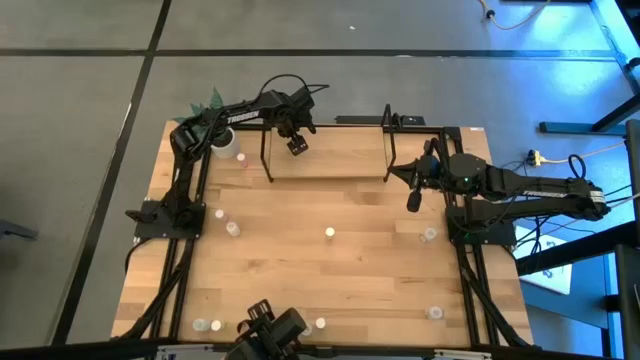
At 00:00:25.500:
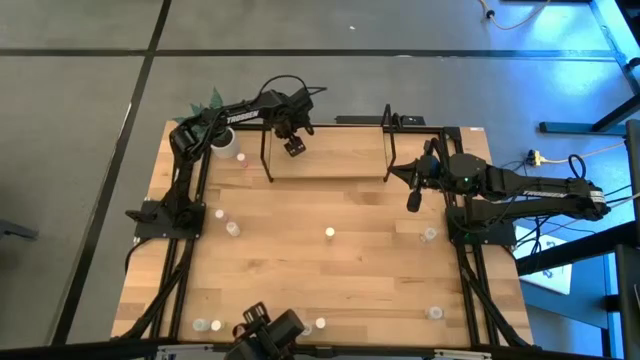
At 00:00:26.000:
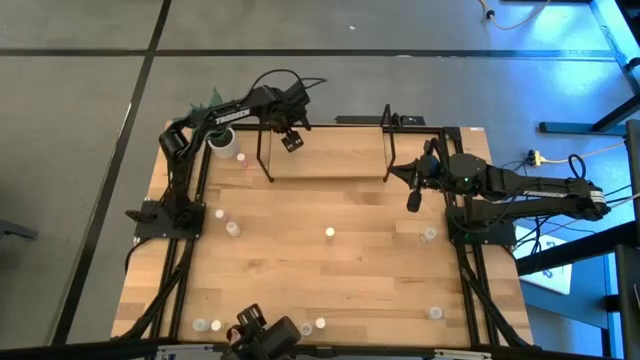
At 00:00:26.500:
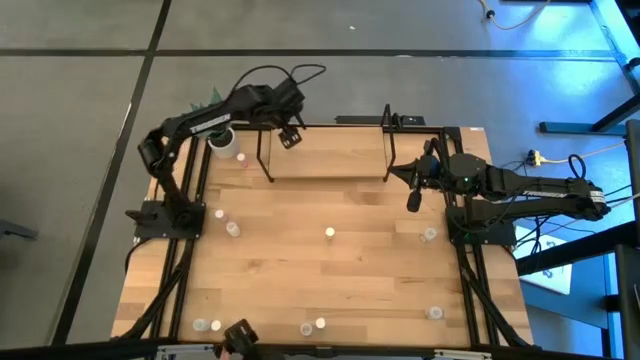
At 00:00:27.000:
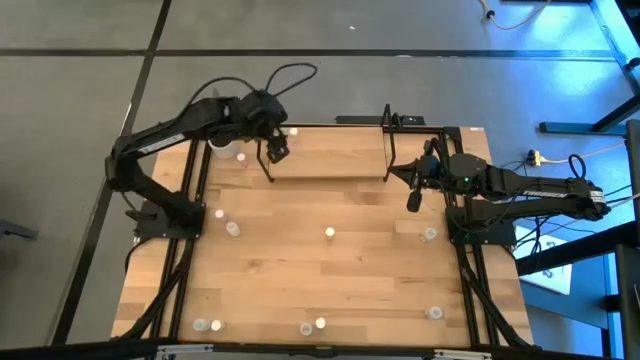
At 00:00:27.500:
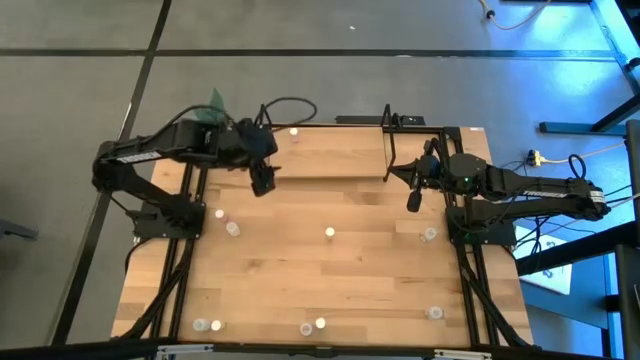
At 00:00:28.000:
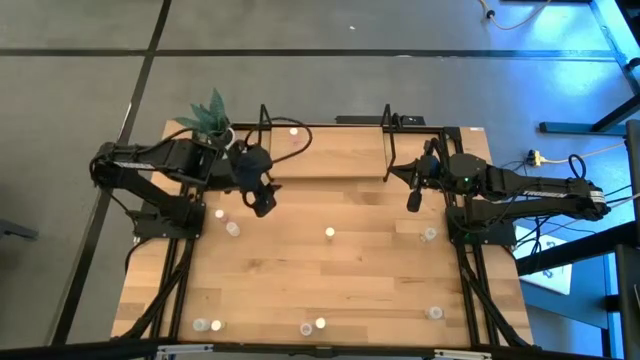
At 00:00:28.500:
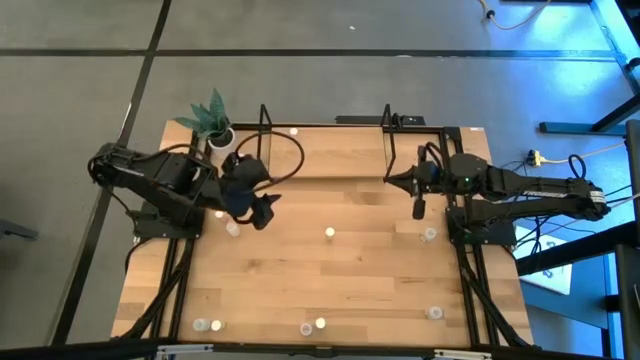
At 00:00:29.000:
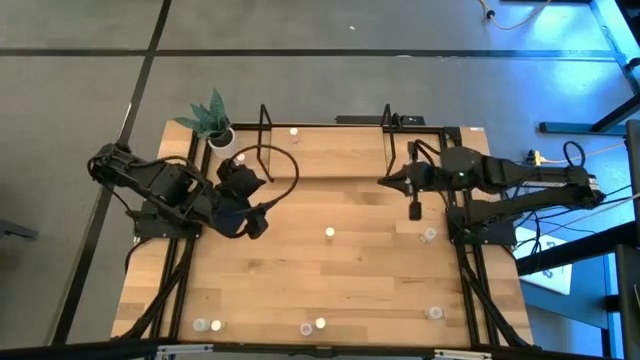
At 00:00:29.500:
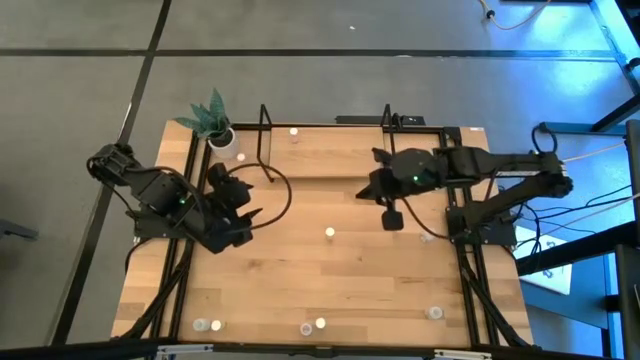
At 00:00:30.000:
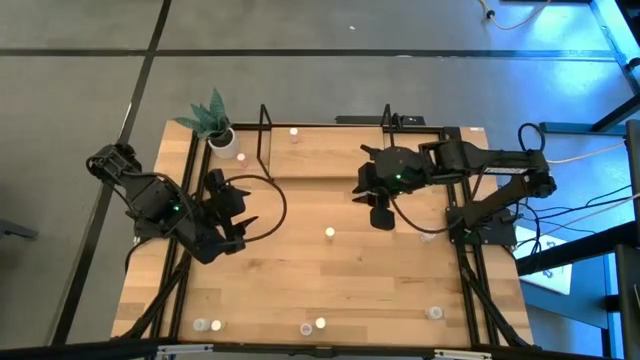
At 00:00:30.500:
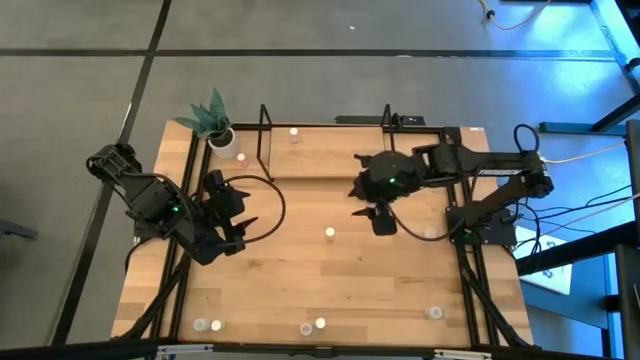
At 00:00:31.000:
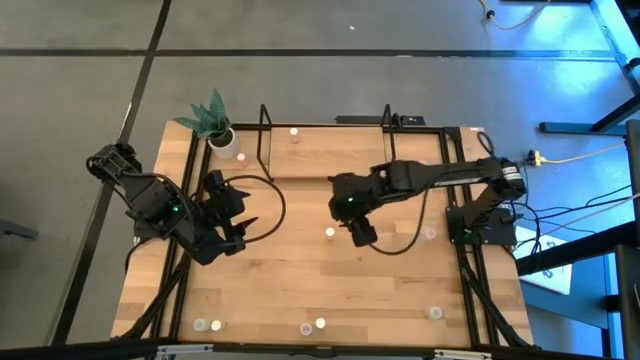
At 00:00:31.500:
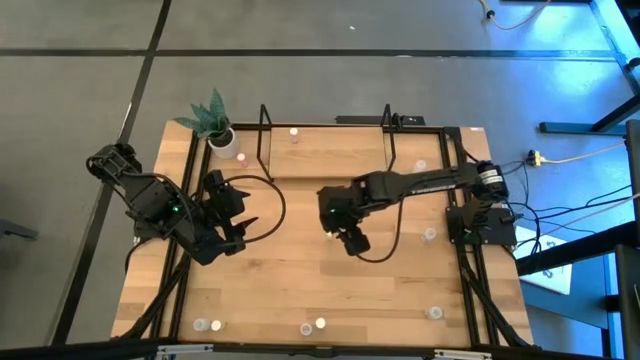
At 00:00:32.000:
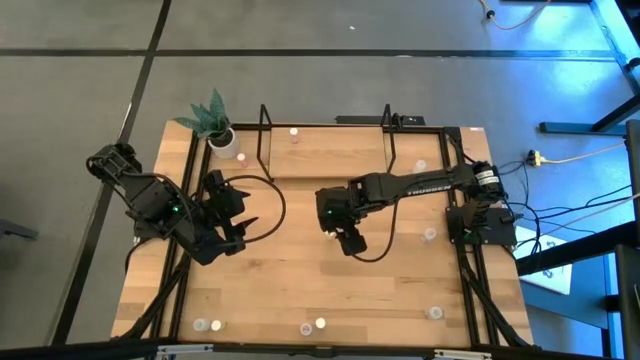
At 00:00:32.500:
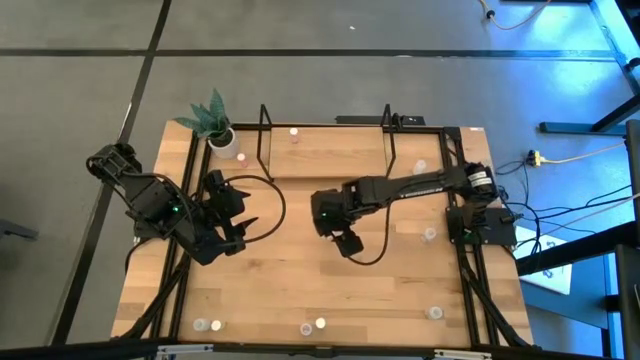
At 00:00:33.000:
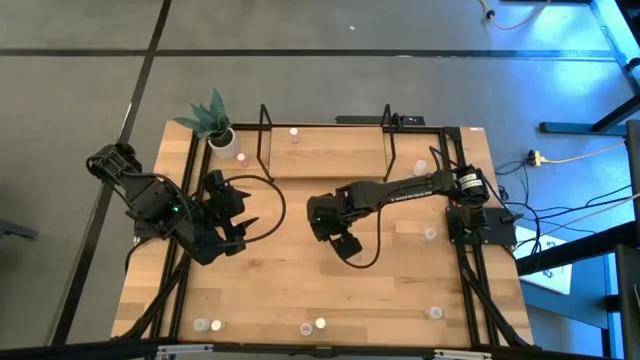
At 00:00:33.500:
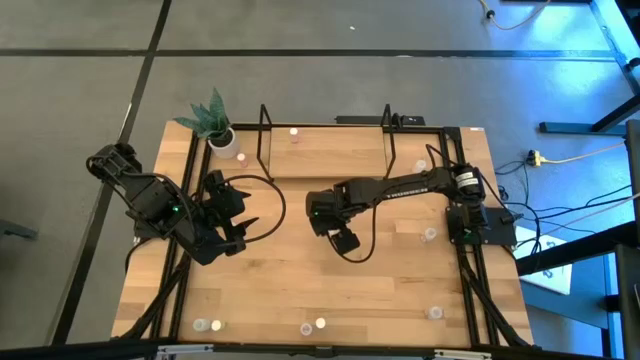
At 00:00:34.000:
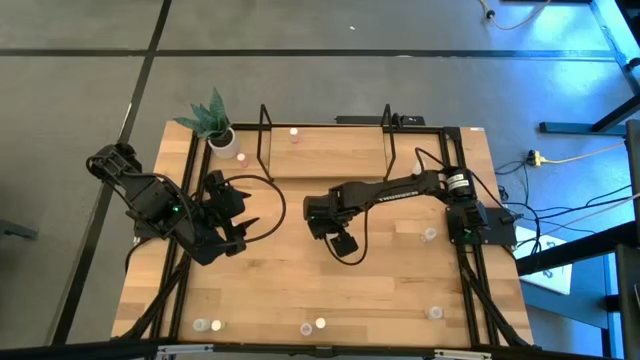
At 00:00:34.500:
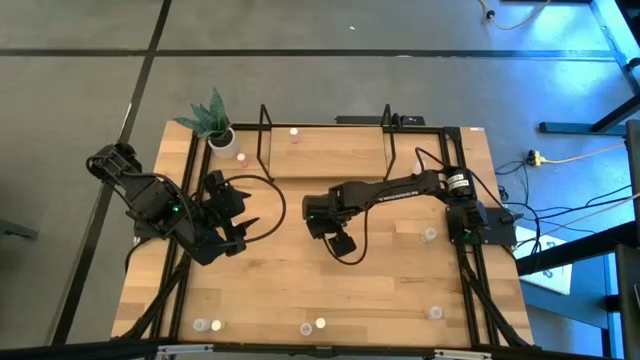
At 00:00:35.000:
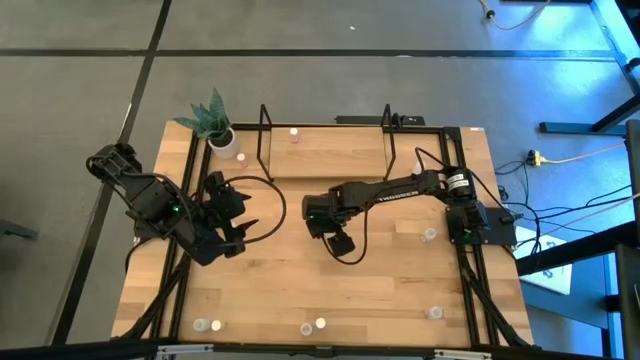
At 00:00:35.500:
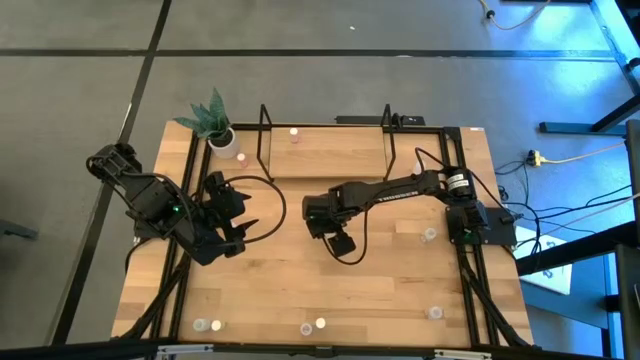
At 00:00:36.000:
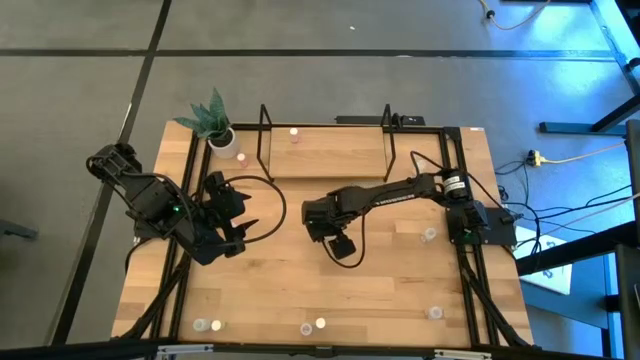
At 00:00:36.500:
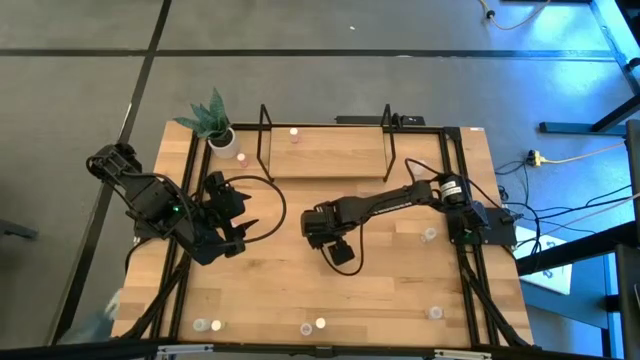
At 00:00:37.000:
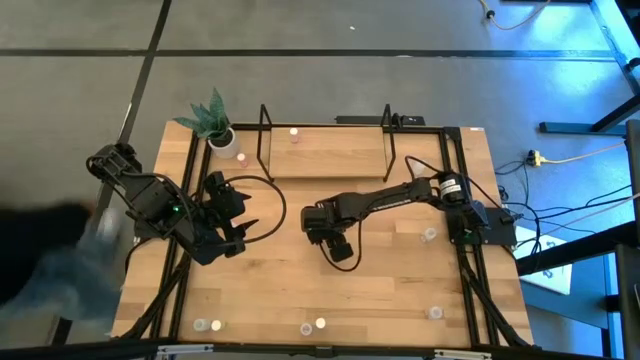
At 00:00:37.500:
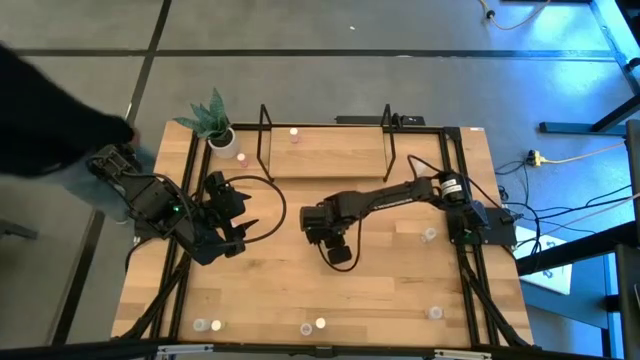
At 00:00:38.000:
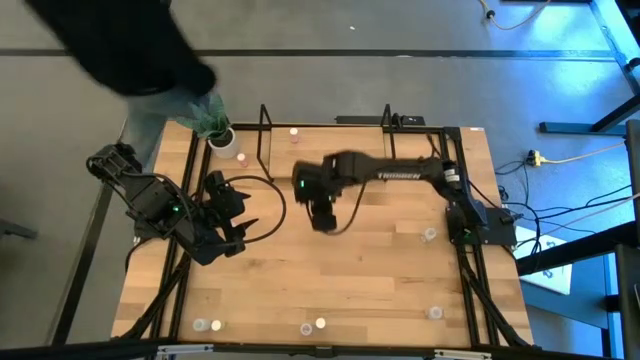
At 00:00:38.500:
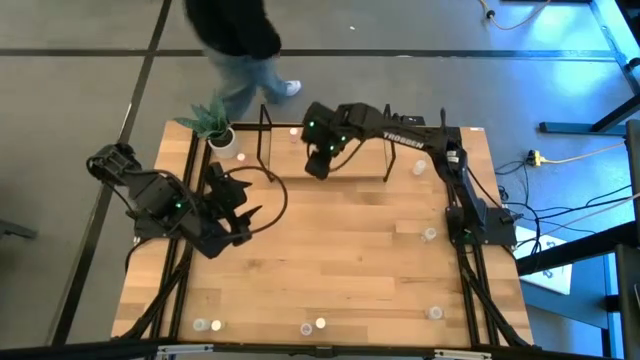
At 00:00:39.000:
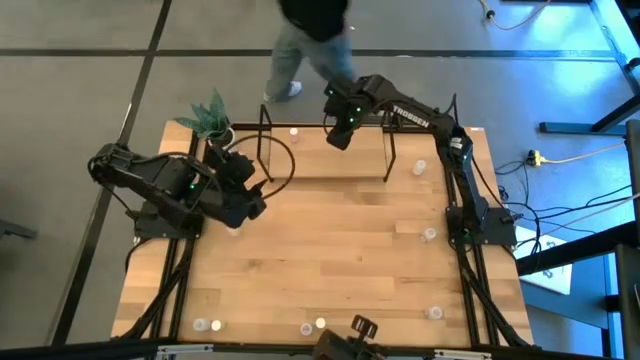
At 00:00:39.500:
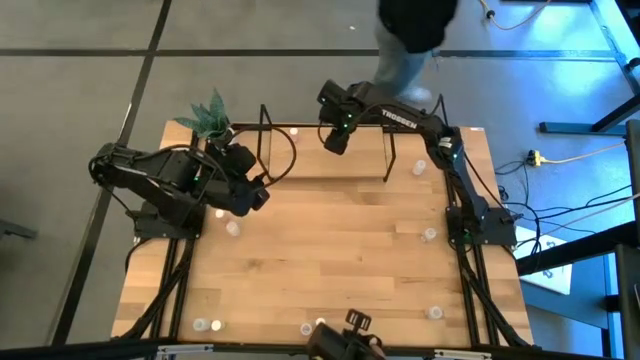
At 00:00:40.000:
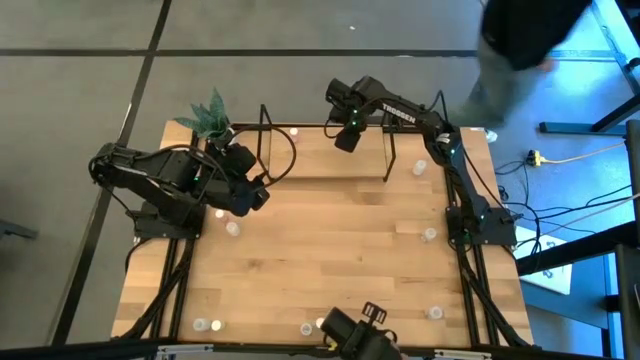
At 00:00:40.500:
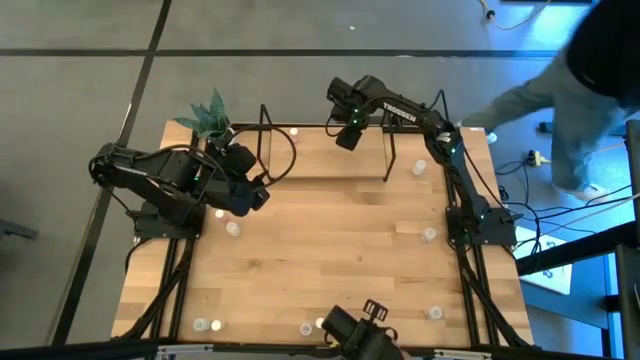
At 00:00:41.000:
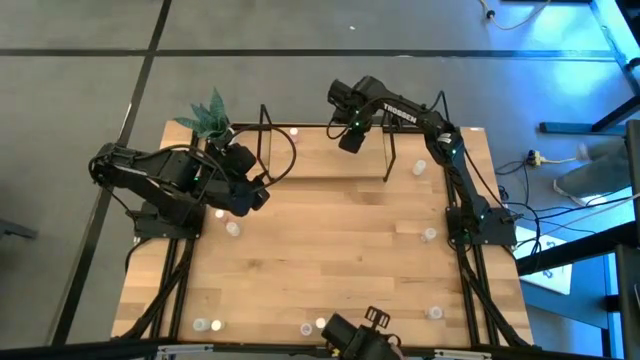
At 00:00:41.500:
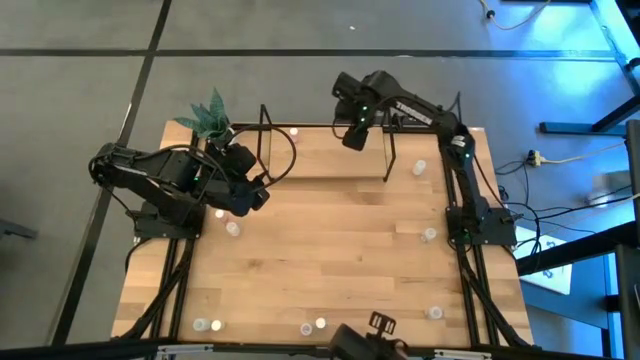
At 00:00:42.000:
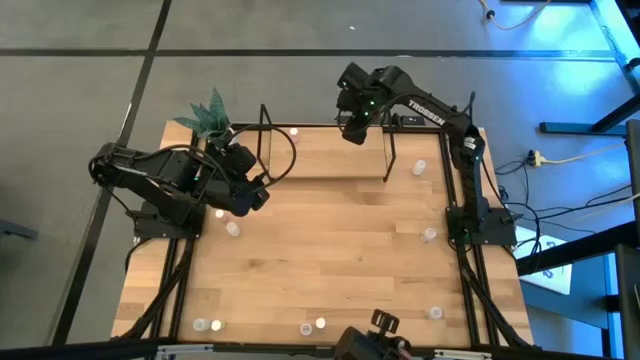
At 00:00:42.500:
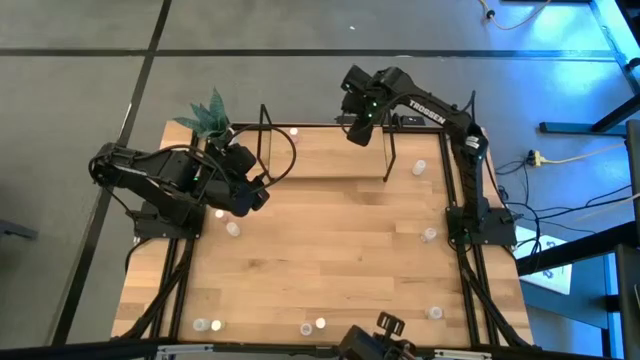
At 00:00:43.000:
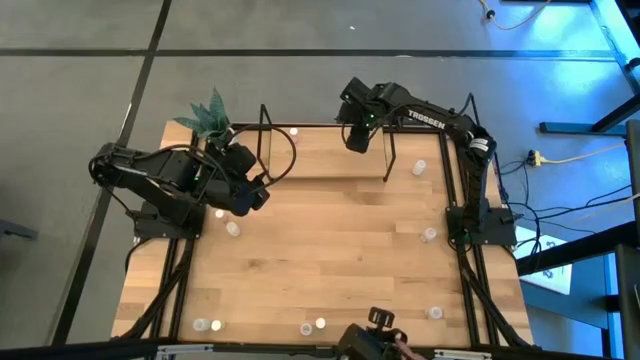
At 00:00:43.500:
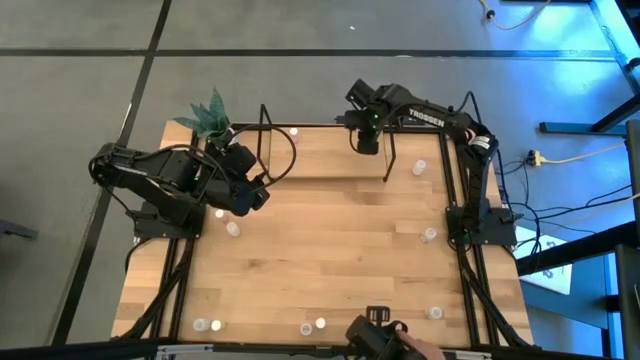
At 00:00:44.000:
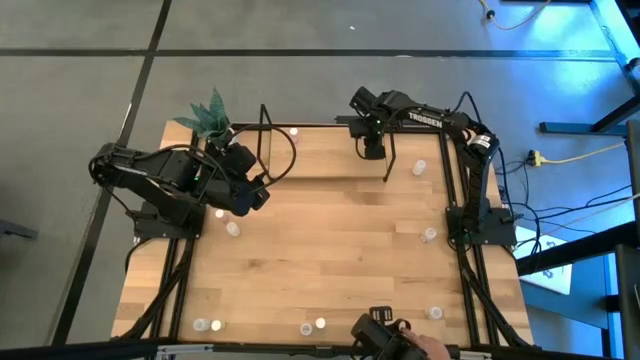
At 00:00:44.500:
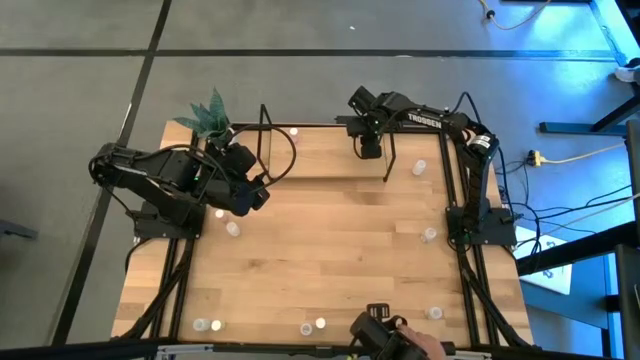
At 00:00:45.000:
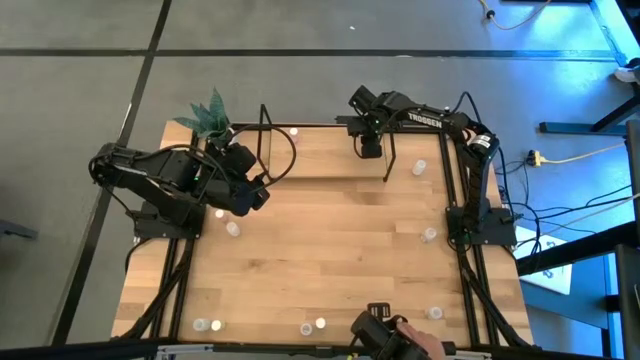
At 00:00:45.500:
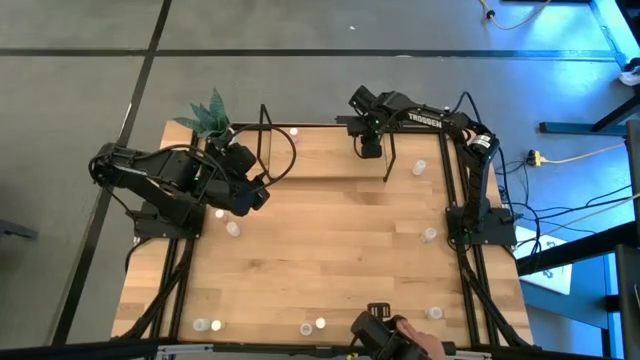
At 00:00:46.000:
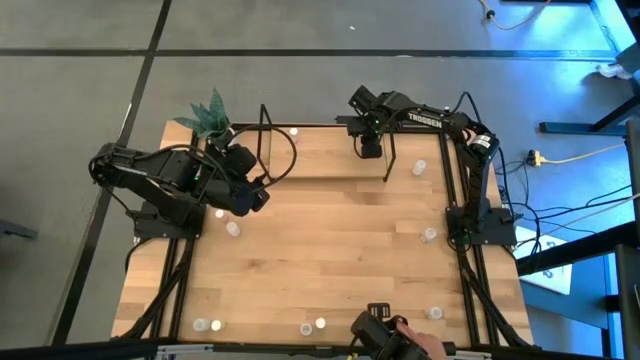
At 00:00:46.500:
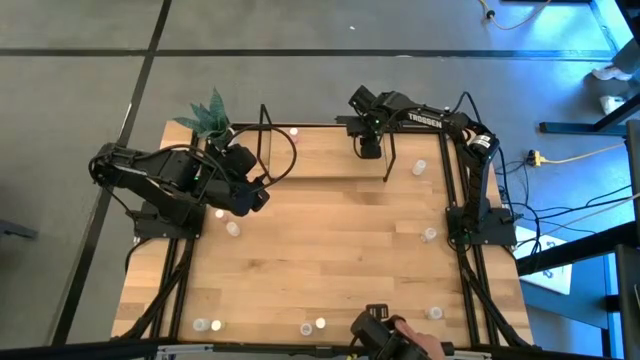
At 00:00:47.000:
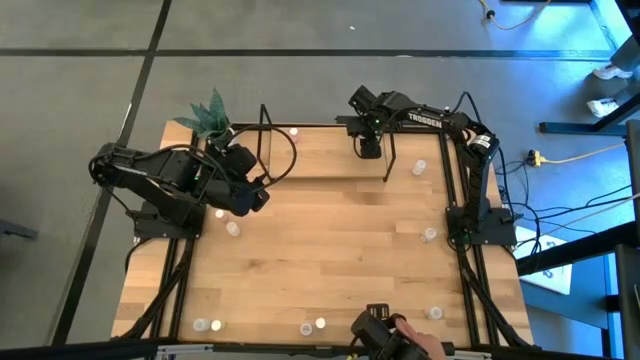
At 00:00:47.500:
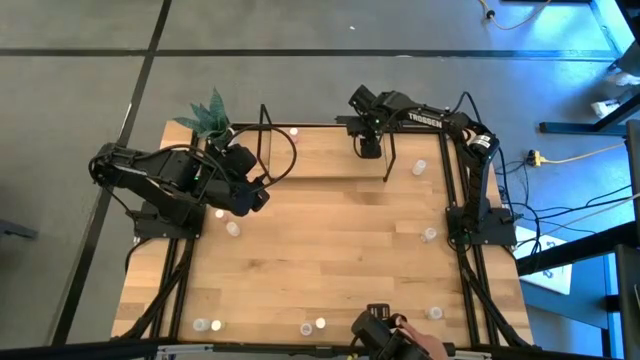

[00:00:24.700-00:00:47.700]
Task: Pick and place medicine bottles onto shelf by color
Put the top yellow pill bottle on the shelf
